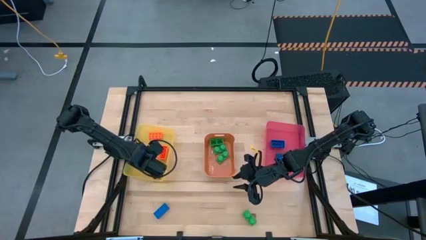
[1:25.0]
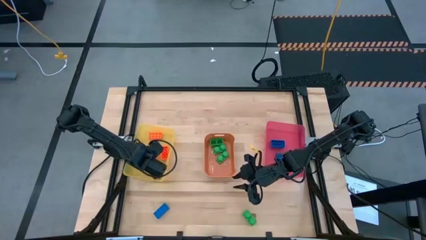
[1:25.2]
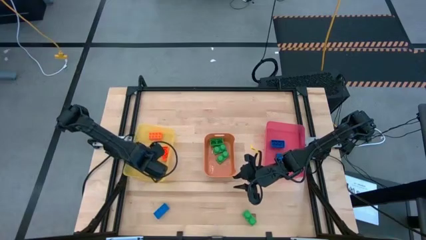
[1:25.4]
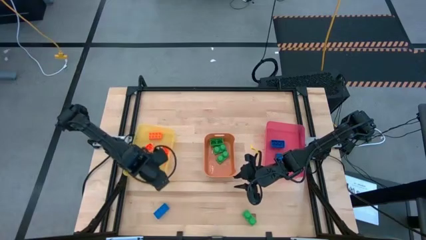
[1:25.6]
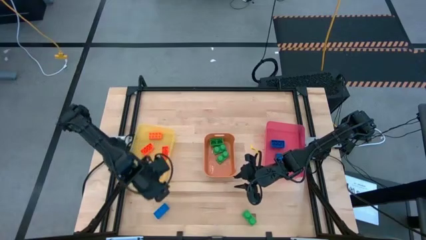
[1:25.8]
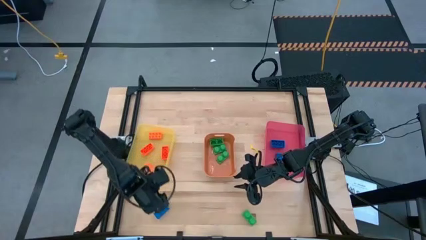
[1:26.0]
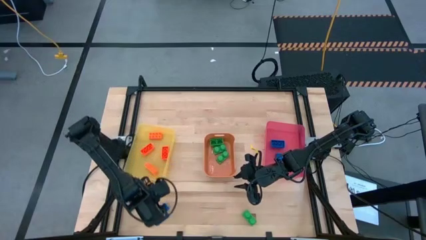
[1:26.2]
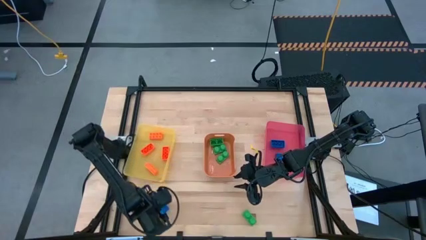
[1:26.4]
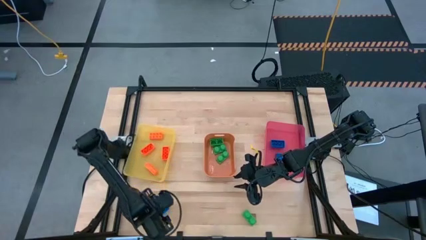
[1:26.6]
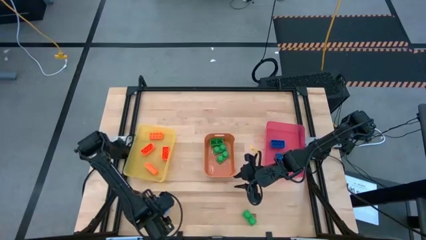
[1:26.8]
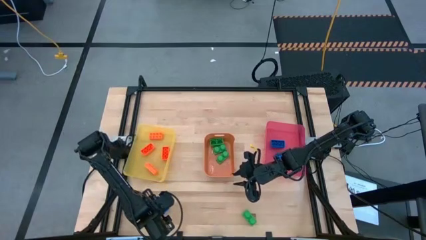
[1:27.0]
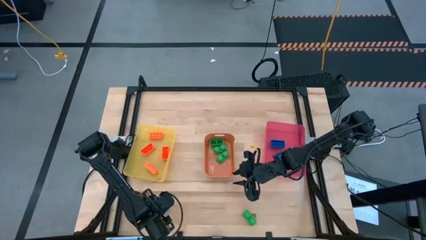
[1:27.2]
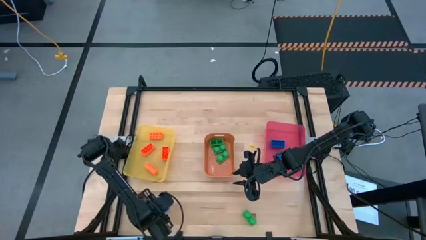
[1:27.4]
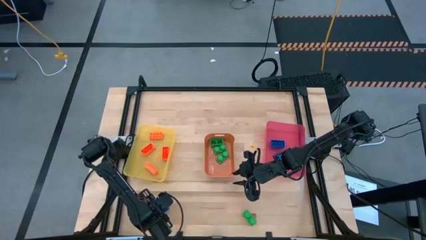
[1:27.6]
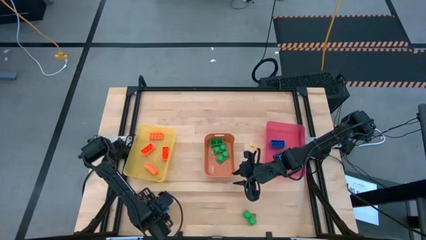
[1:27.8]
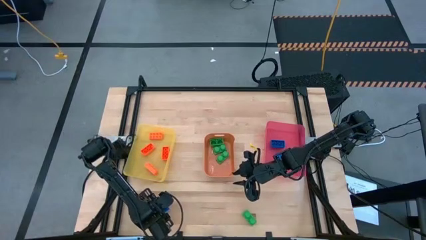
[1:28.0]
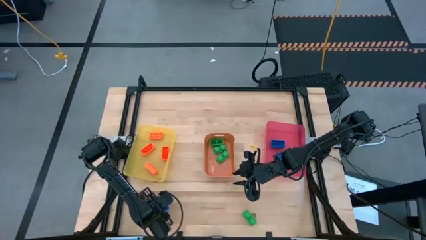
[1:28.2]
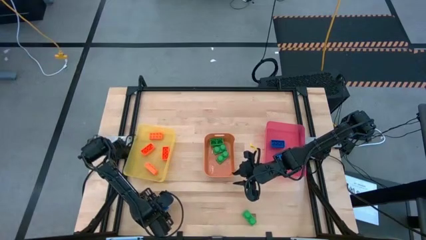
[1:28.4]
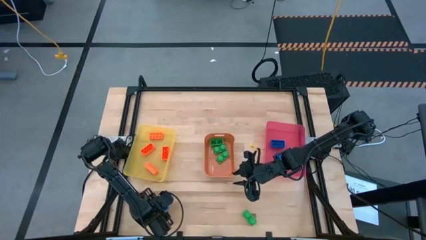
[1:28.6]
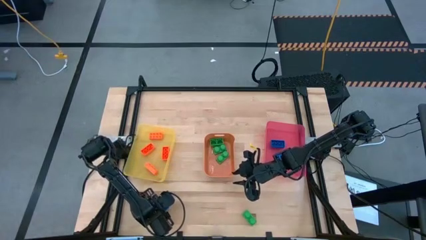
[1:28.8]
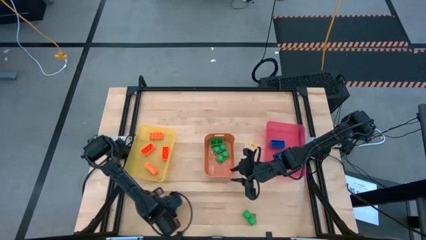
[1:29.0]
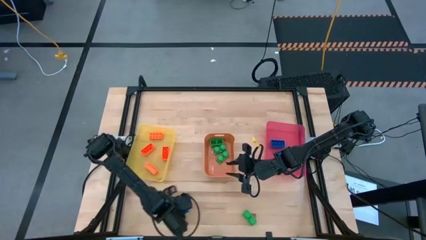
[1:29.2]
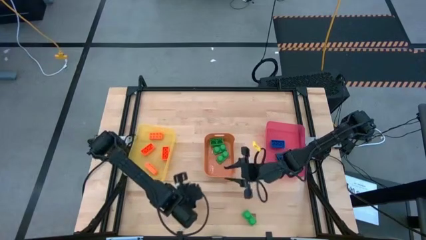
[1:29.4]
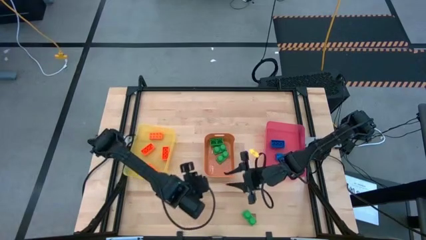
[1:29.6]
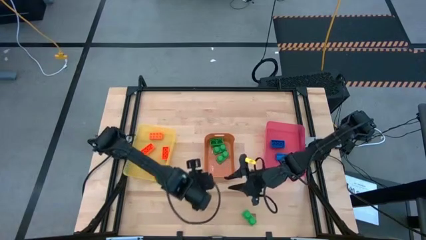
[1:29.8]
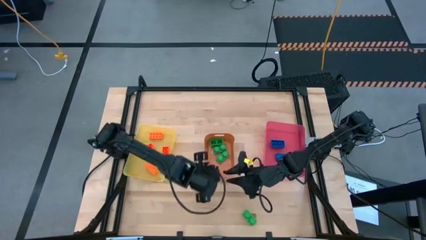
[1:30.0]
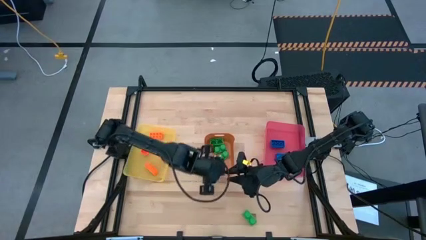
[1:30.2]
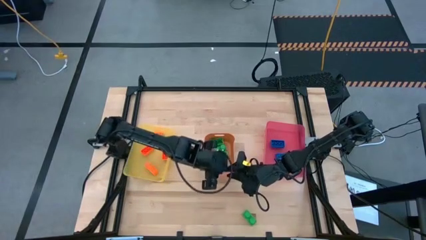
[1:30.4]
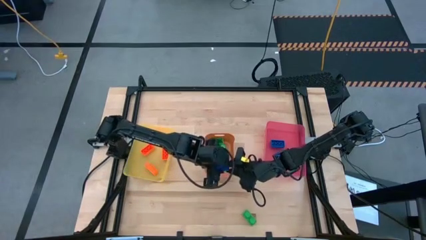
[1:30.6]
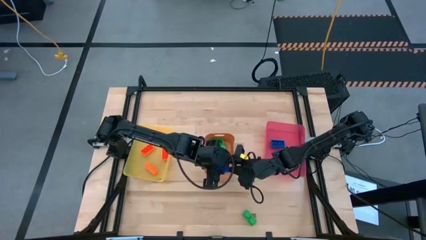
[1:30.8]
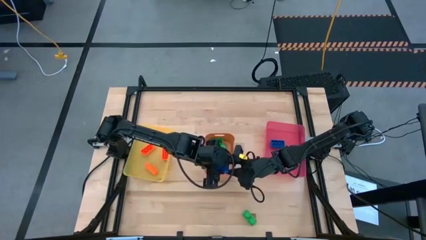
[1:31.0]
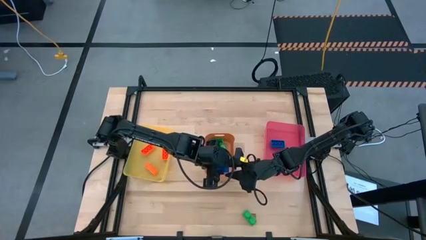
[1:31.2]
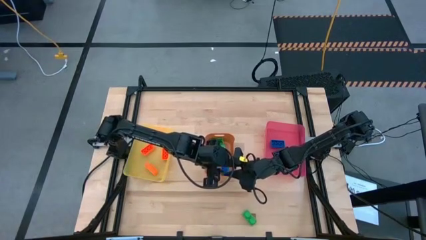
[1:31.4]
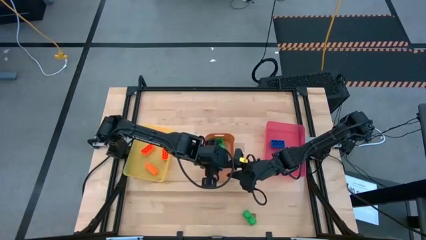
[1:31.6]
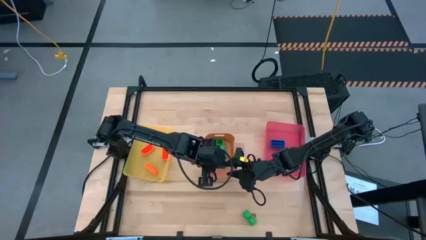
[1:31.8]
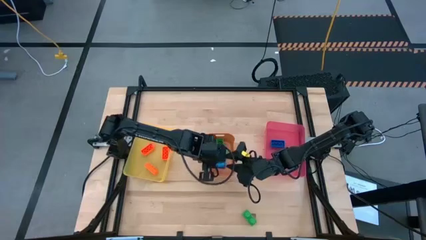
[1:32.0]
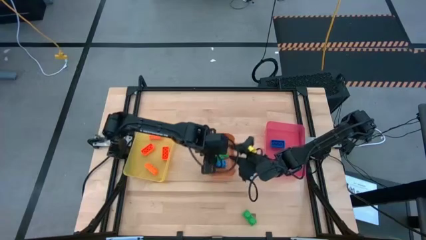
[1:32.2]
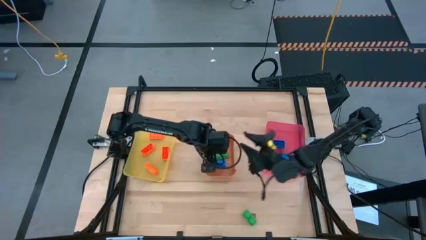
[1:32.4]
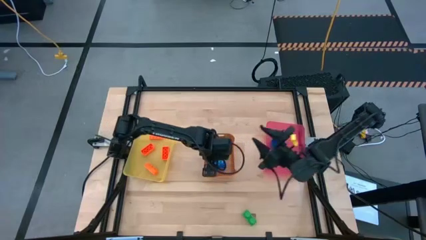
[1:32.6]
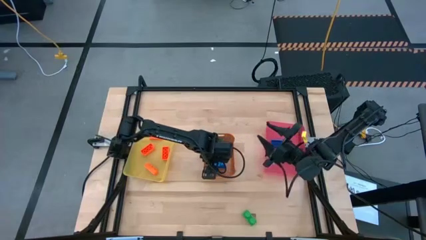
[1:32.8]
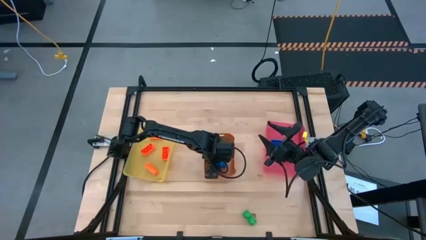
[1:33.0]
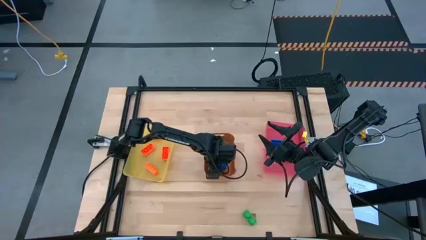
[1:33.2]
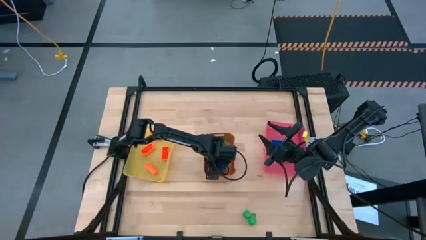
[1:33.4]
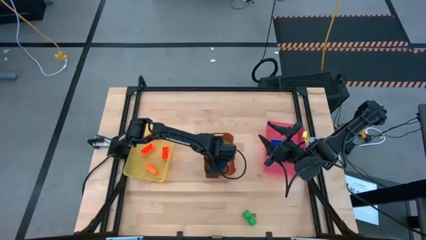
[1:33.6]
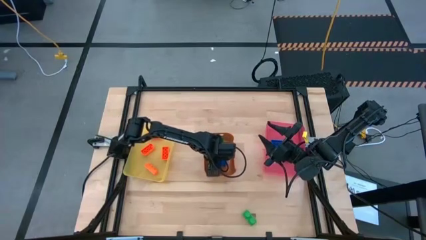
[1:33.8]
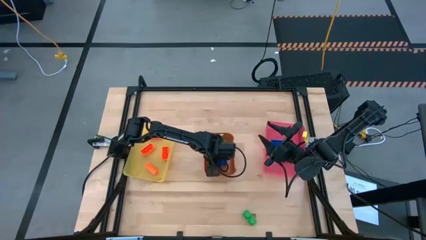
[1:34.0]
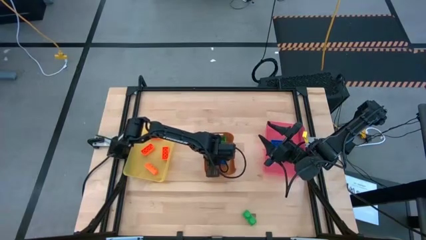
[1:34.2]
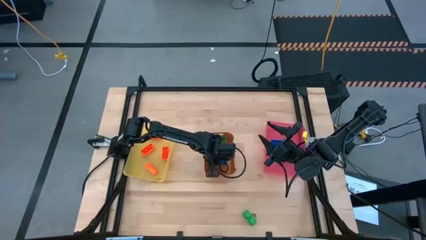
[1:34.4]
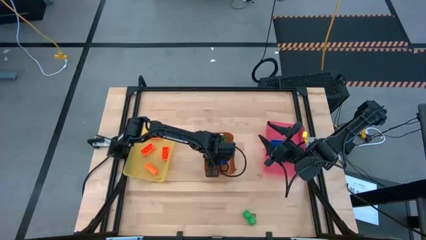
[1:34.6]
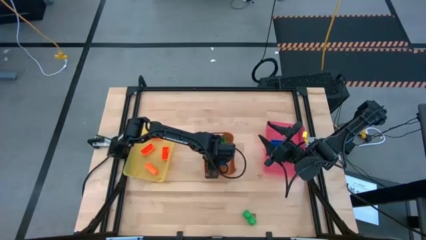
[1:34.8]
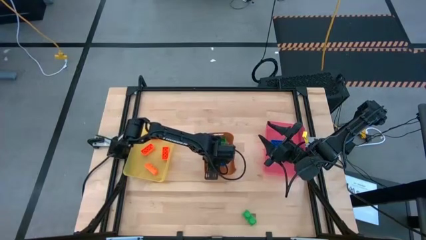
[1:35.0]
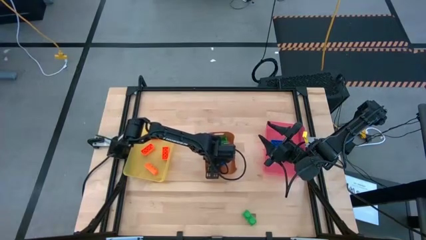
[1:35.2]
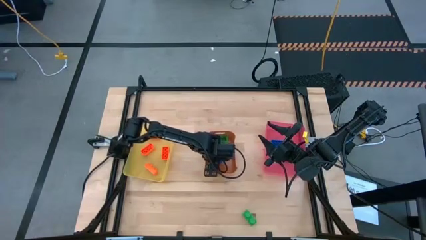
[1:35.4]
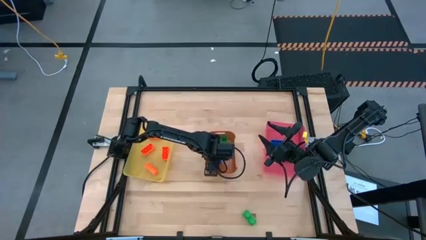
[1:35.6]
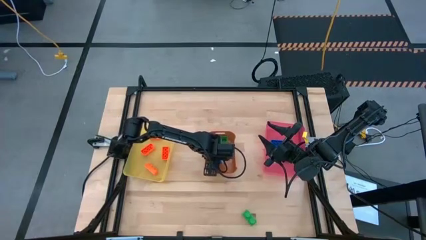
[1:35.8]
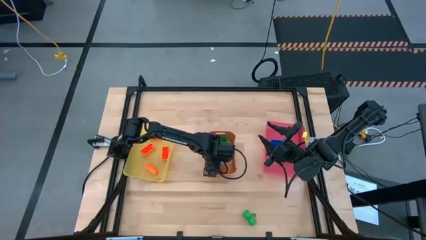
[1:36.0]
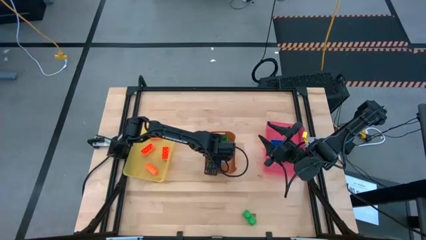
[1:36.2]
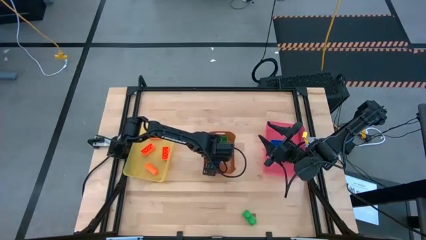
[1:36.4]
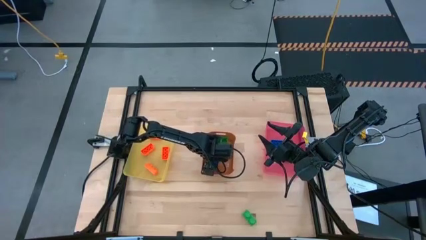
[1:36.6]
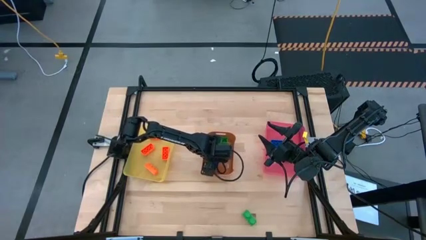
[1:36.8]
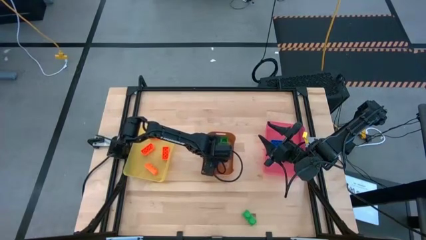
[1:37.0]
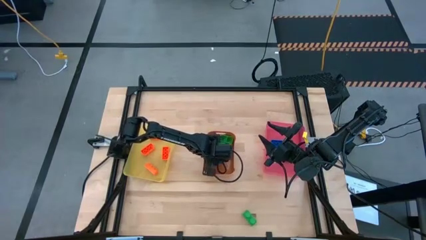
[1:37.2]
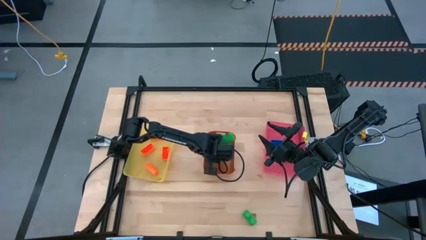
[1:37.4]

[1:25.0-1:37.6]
Task: Sort & place blocks by color
Put he blue game piece into the pink bin
